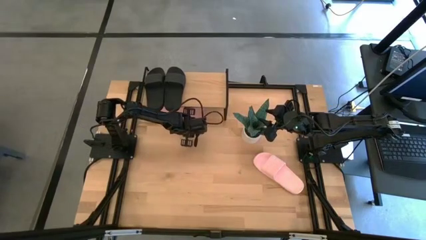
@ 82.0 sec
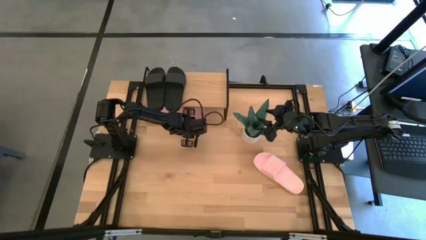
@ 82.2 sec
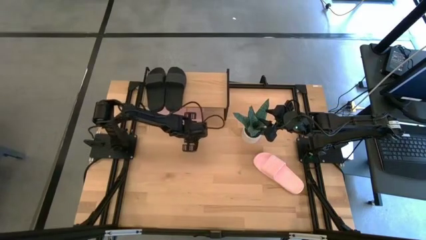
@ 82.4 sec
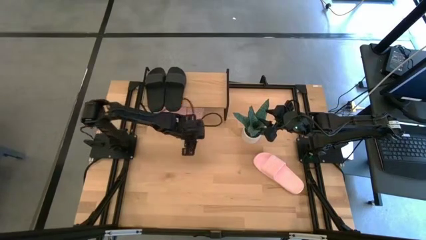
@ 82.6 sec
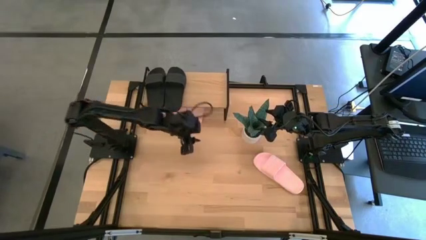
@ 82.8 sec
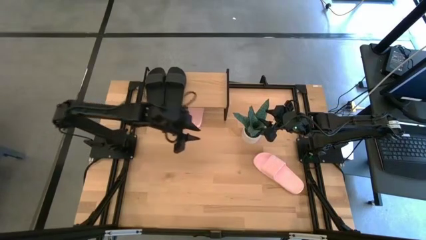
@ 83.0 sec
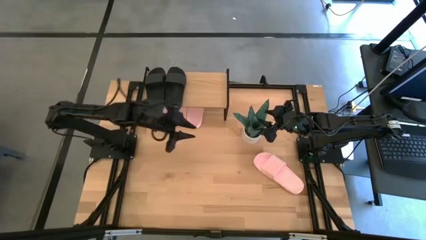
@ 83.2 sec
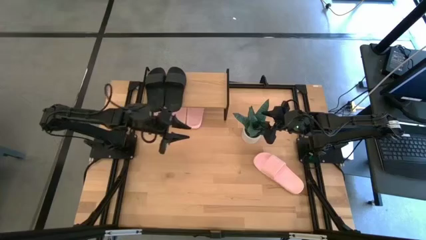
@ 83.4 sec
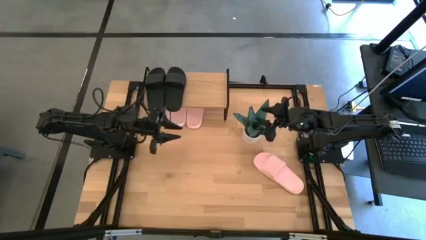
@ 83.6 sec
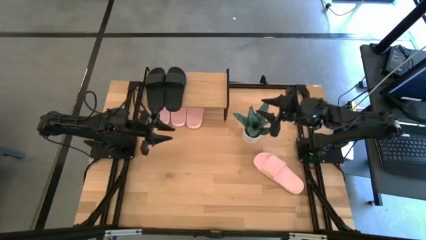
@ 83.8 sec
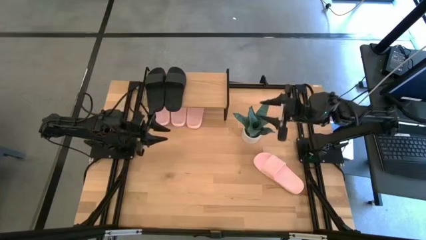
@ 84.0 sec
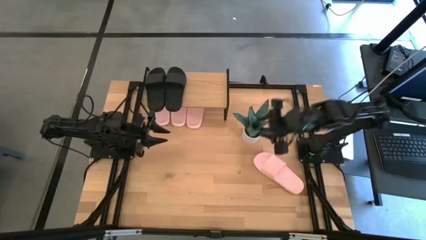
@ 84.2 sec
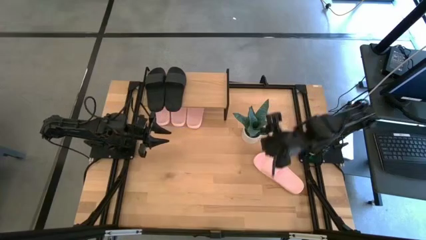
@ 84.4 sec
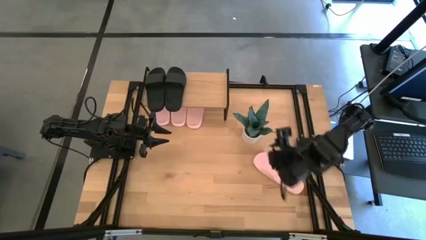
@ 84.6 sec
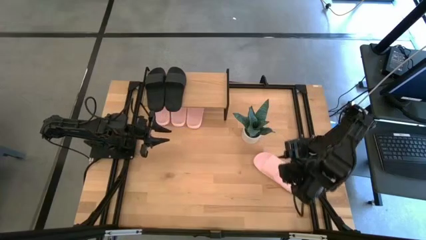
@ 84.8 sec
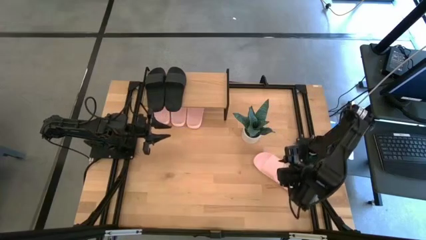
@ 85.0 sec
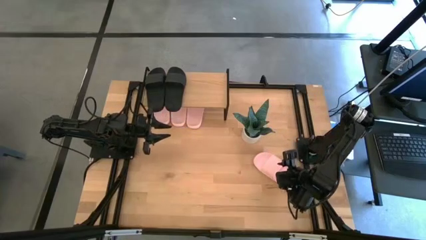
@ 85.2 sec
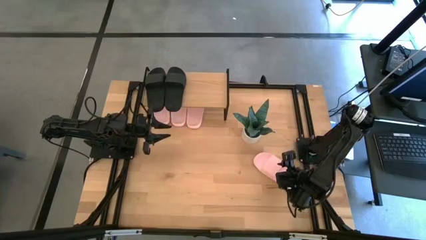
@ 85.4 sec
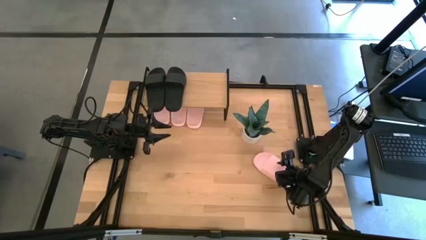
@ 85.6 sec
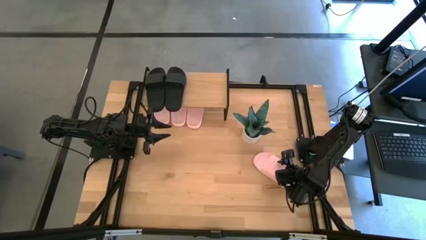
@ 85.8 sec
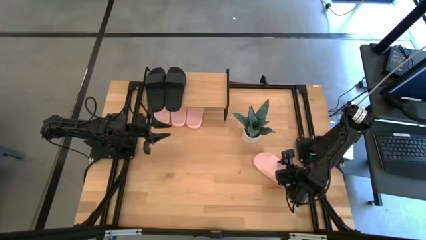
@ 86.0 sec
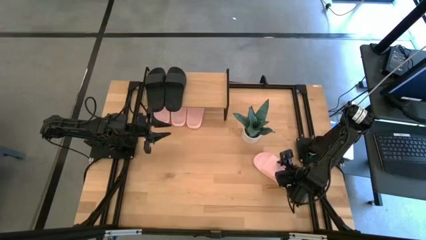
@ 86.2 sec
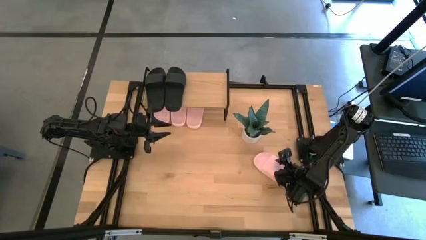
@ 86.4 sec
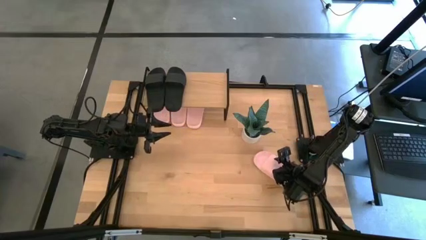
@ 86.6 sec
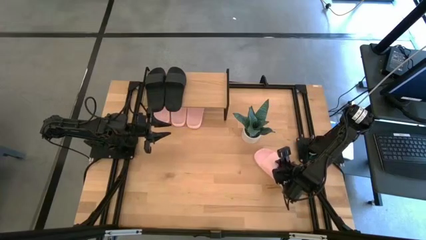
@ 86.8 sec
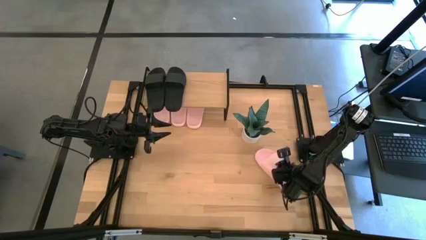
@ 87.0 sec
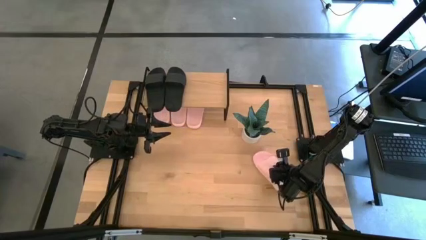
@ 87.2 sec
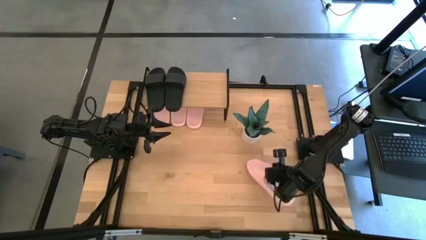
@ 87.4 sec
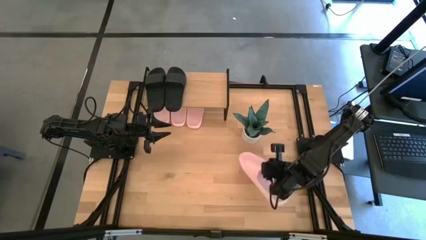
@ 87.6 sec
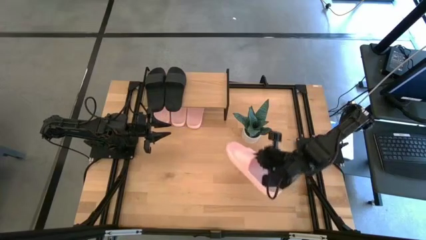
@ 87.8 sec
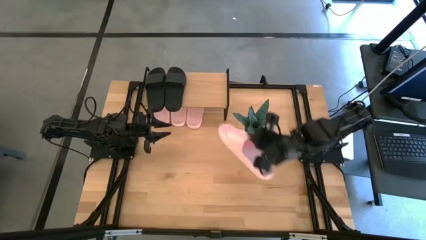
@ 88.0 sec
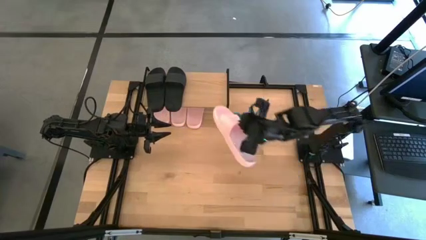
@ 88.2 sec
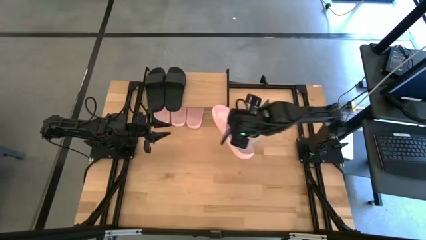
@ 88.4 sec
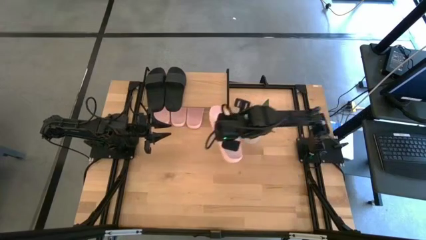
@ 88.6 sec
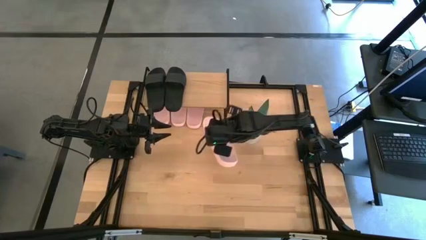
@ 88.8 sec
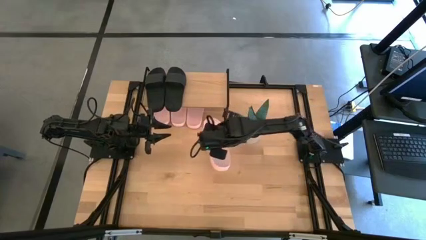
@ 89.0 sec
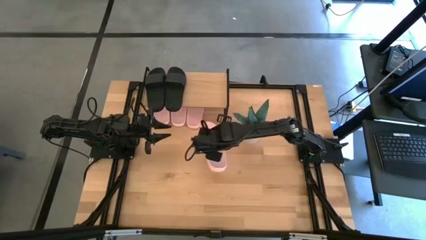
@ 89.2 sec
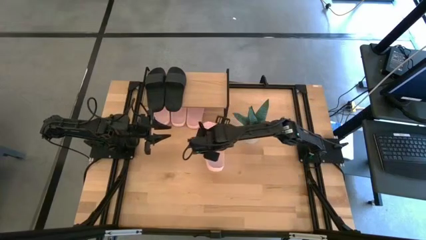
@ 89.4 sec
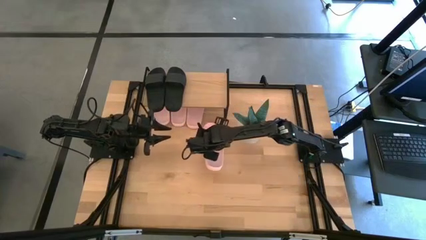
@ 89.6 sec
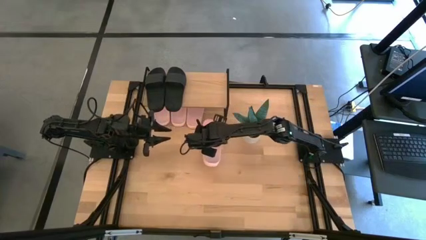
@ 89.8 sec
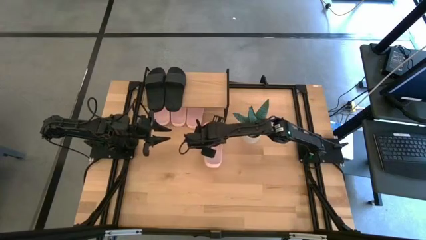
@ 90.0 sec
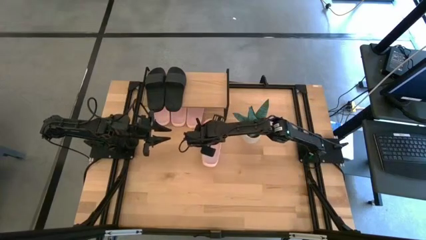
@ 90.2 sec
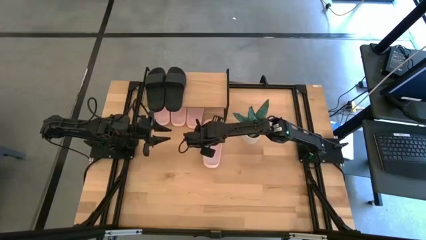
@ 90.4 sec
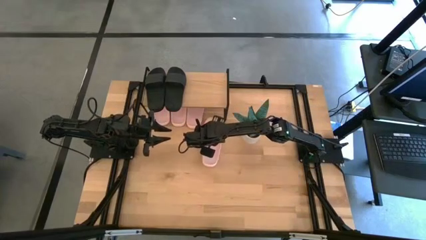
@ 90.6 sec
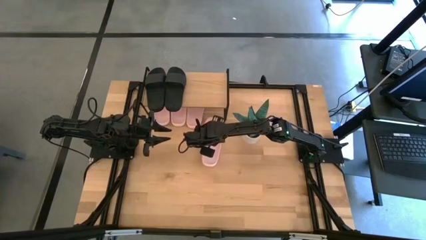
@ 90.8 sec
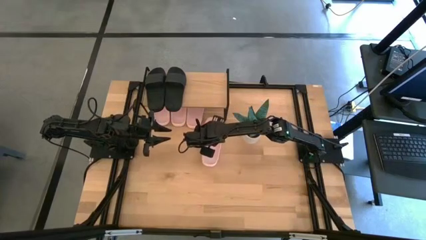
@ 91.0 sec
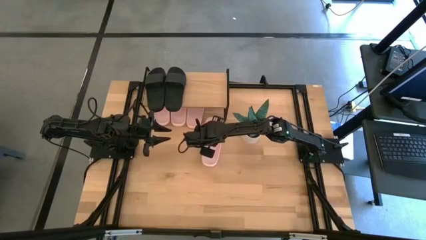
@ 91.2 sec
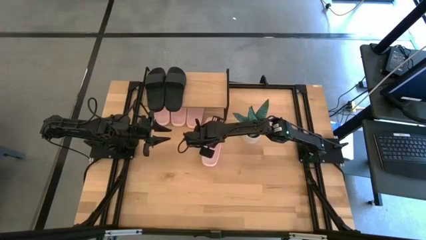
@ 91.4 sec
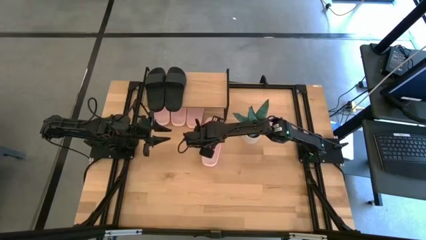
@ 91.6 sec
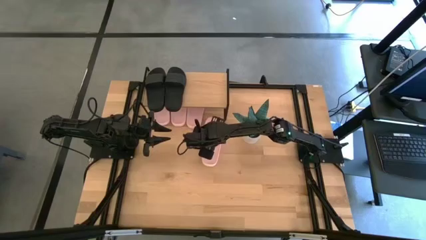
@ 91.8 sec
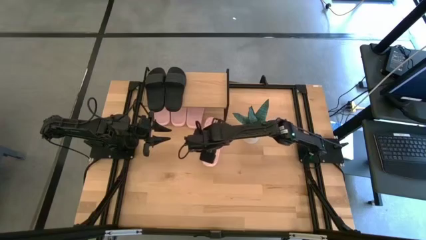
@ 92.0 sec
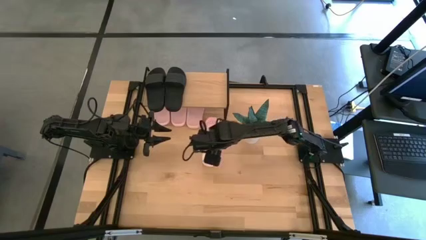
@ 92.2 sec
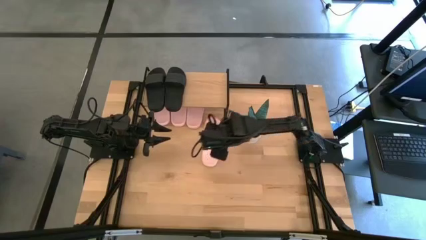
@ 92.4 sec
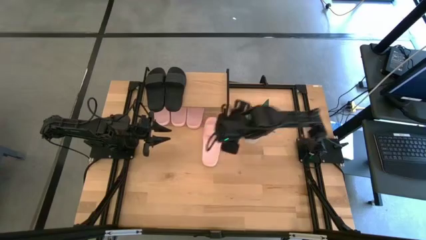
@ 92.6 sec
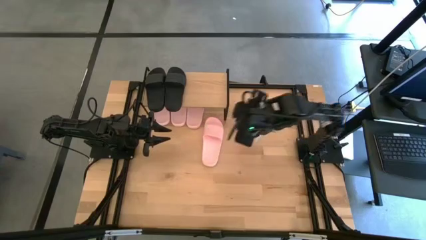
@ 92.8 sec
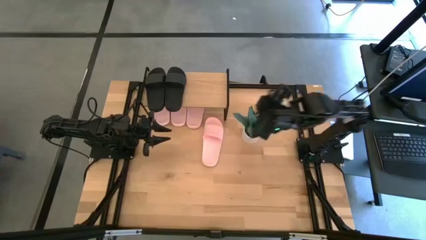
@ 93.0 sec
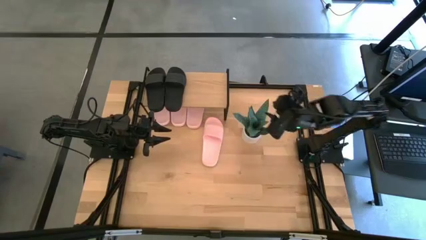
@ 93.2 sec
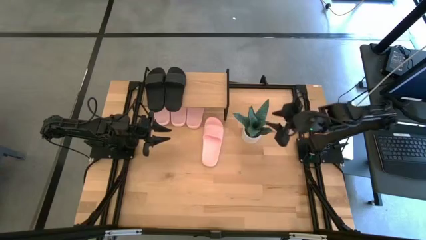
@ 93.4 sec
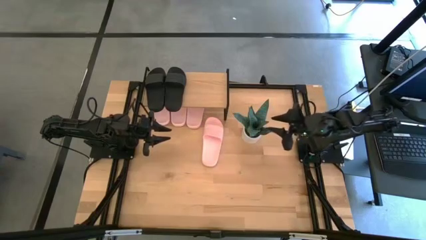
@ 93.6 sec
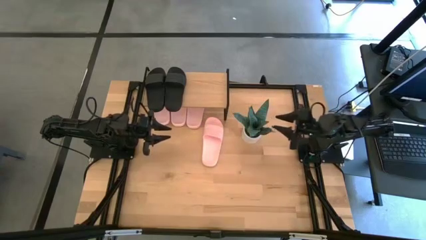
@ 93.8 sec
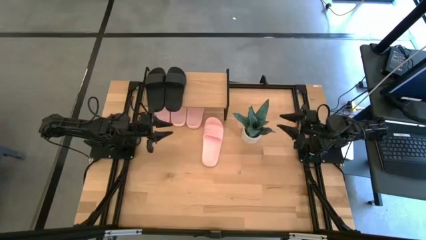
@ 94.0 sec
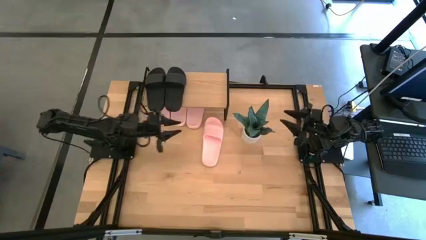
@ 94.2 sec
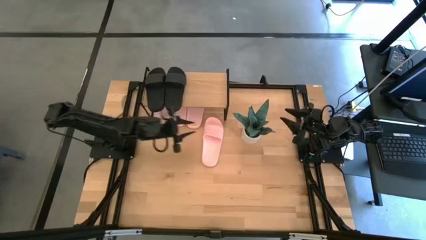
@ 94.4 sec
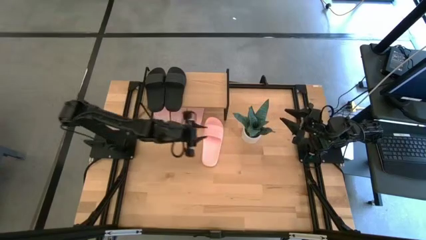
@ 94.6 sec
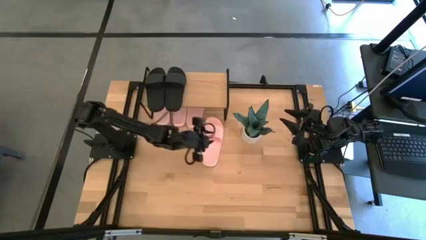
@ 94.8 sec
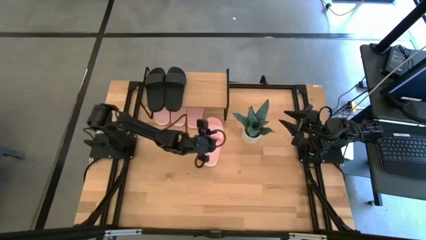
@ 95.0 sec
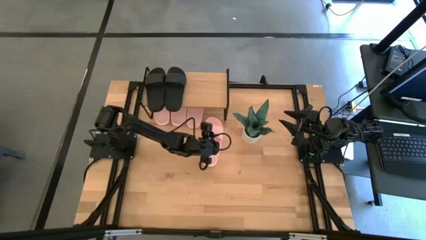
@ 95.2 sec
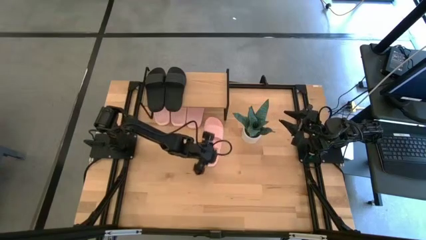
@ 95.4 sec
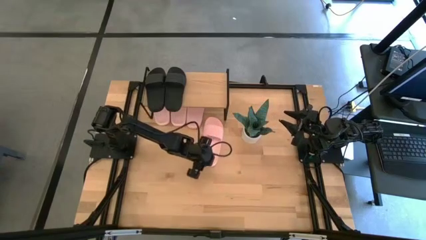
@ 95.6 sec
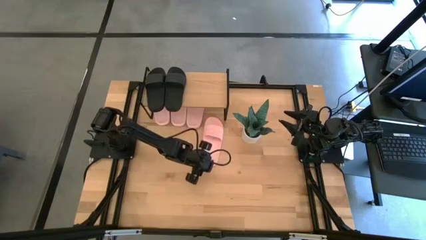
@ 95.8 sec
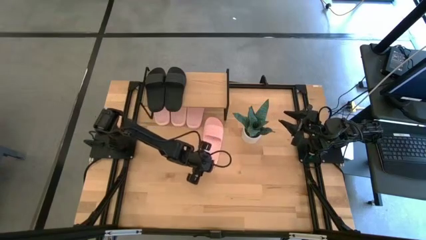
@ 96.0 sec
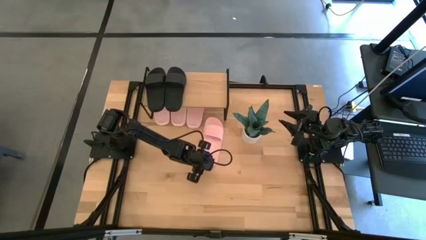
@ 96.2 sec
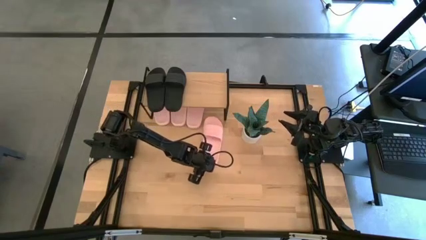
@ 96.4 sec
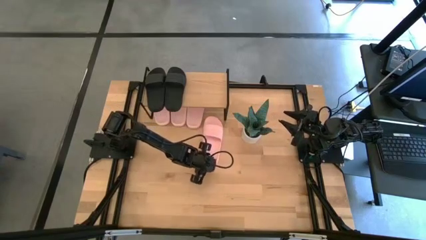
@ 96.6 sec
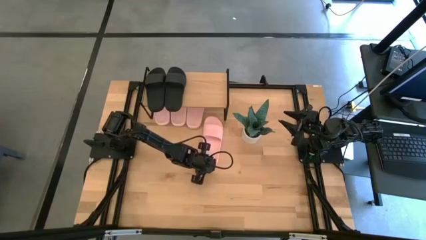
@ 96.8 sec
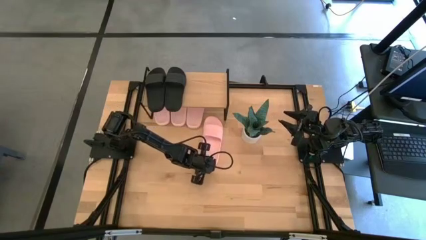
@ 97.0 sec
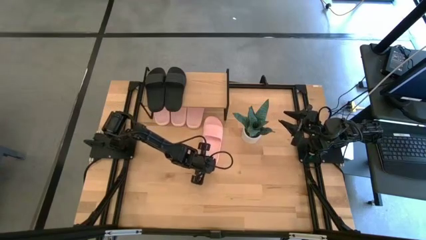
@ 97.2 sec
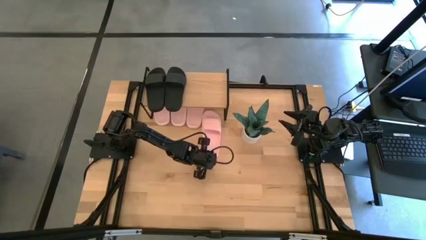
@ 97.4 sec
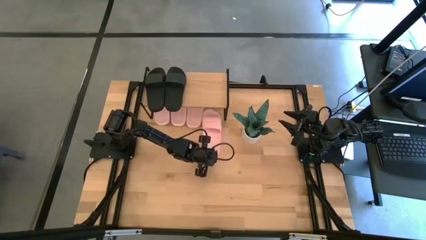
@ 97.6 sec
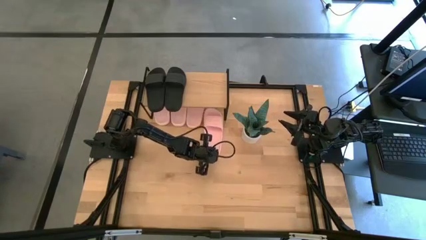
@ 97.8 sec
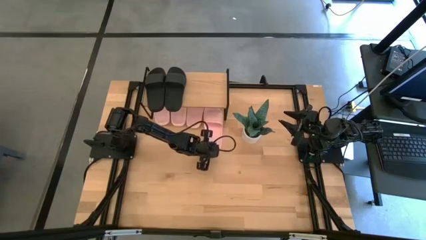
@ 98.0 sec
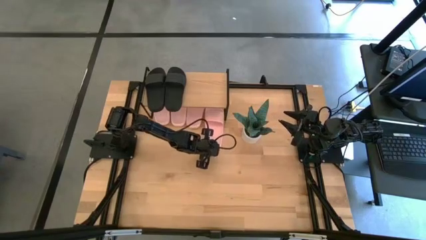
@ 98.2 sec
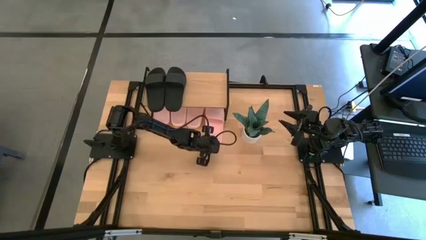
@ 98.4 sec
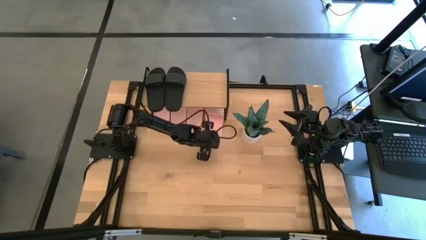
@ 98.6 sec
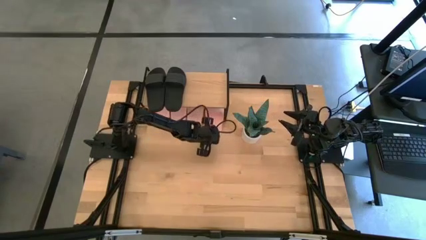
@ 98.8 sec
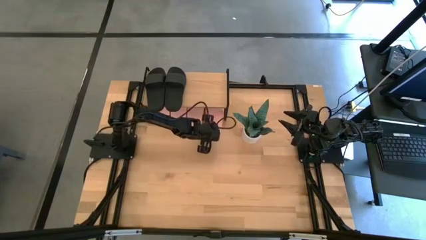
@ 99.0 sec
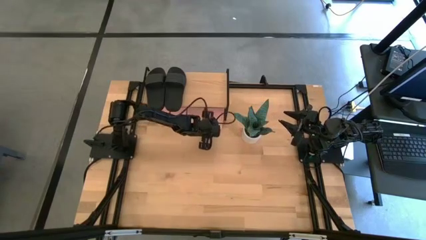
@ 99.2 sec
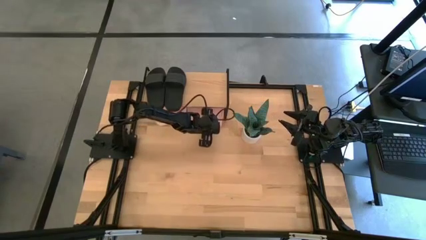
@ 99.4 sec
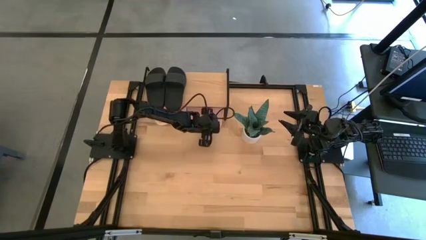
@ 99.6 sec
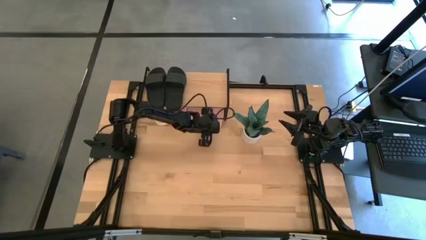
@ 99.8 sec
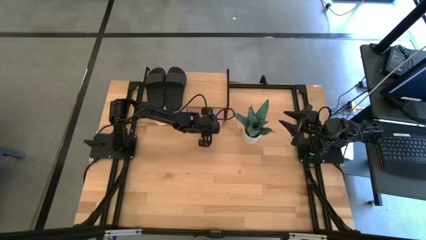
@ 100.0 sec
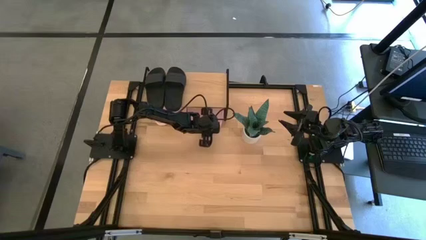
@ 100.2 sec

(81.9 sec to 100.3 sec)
Task: Pick and place slides into the shelf
Put the pink slipper under the shelf
